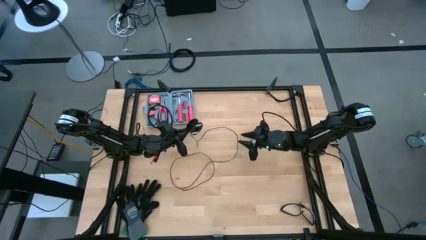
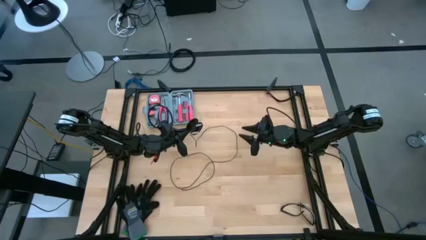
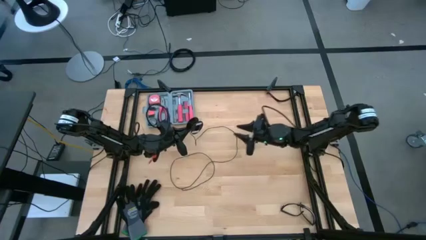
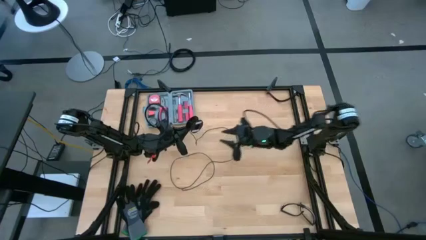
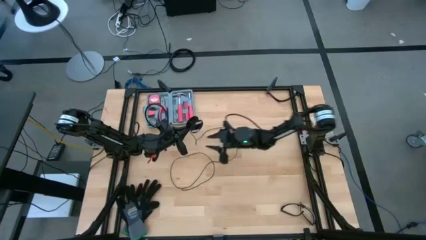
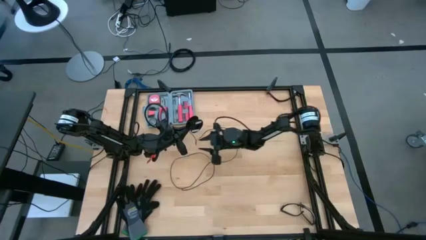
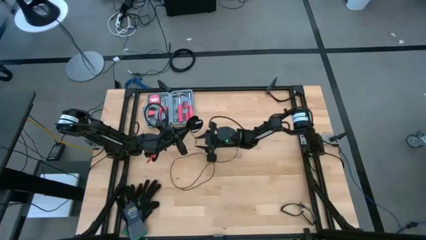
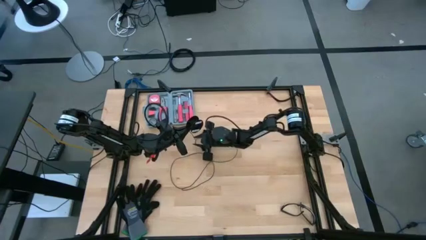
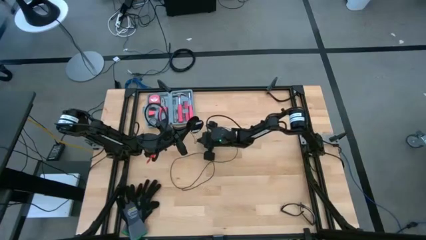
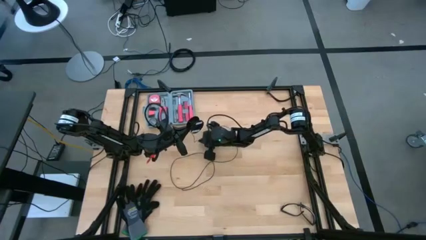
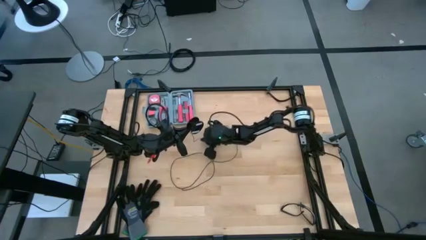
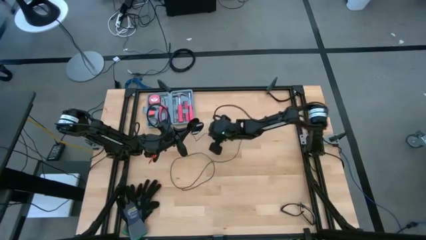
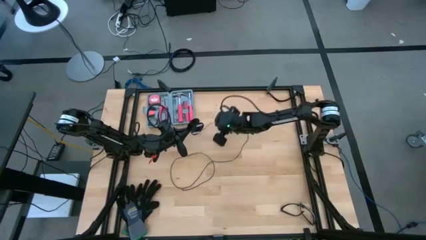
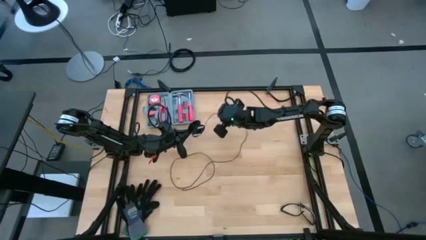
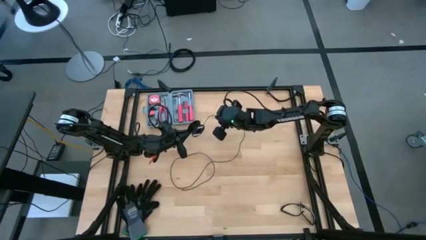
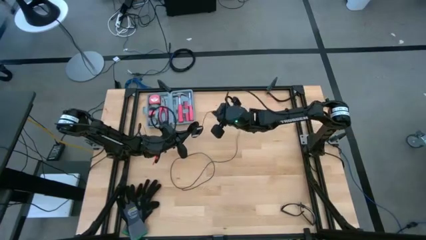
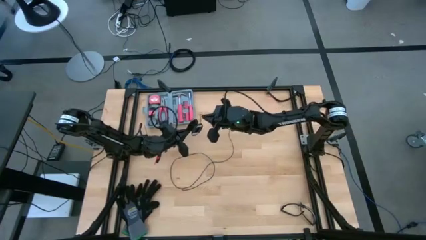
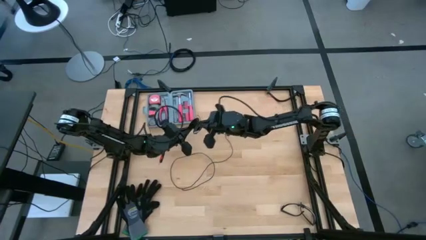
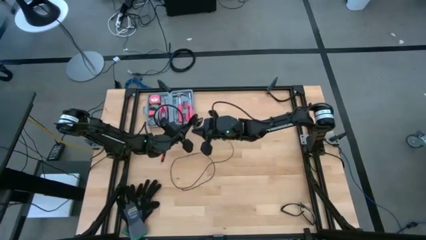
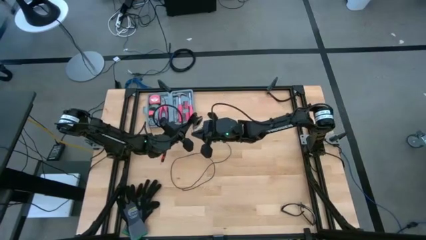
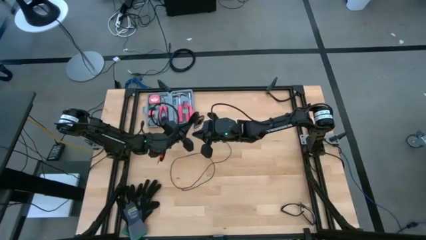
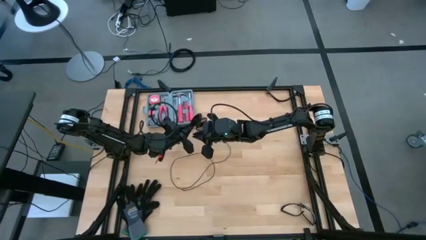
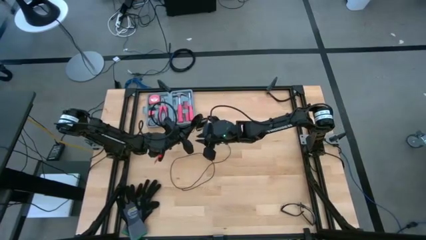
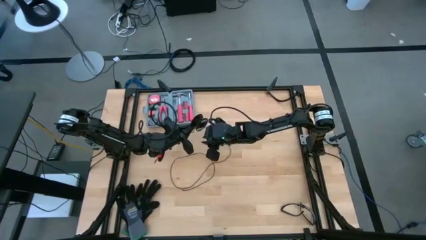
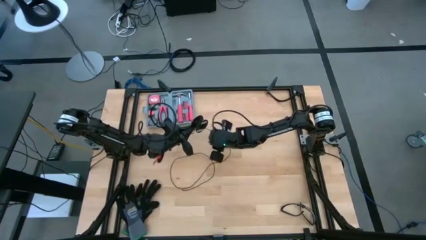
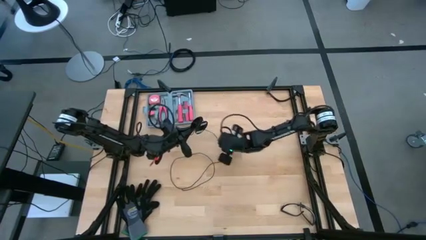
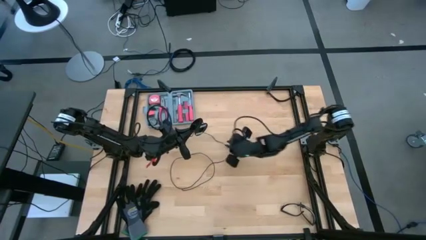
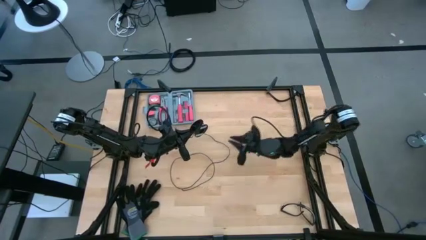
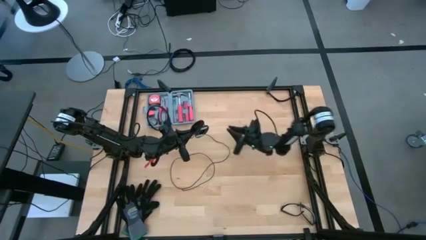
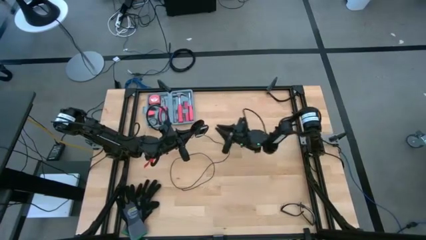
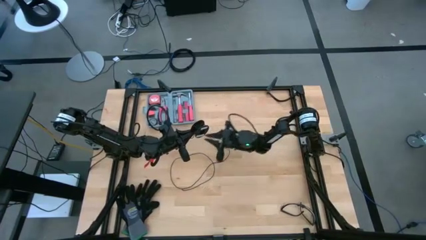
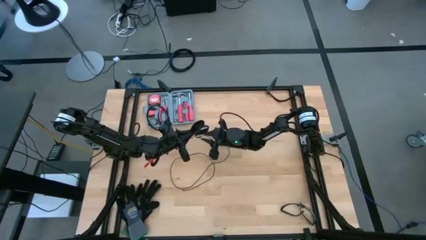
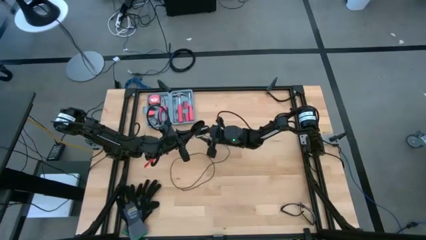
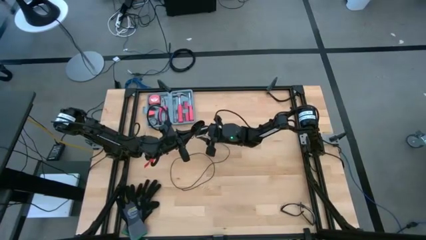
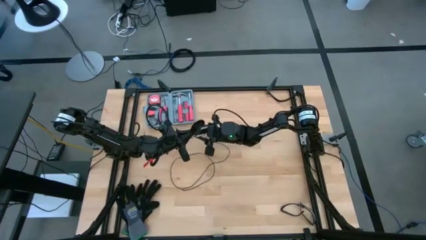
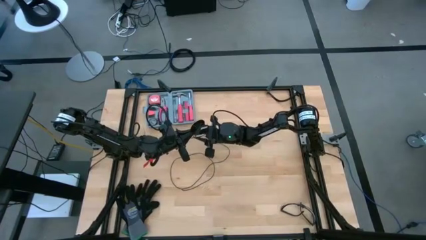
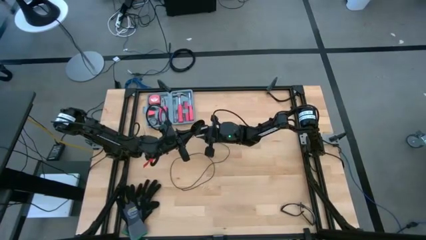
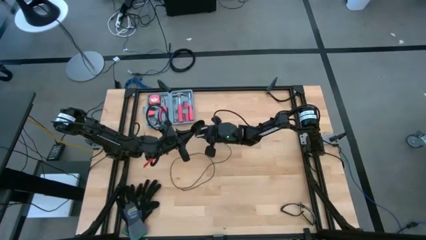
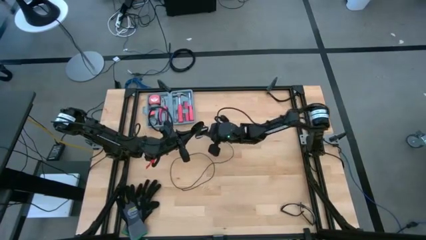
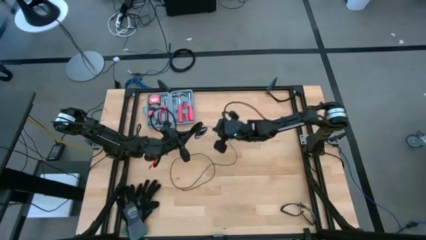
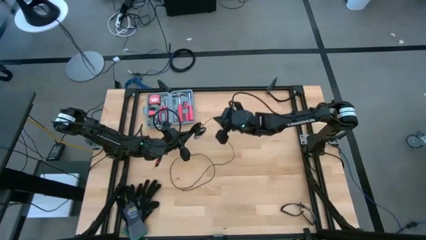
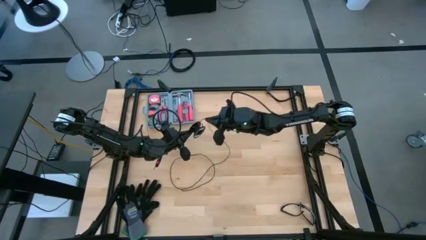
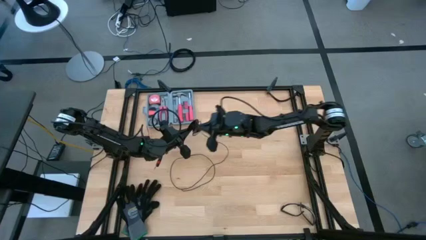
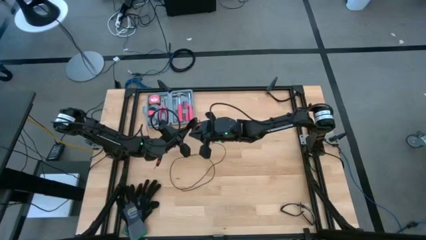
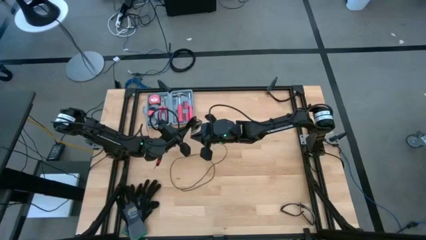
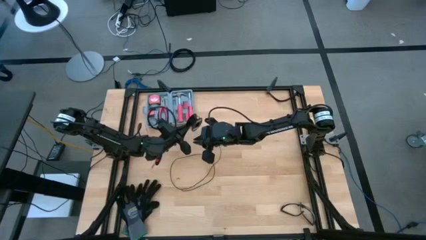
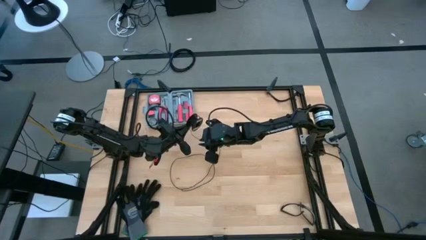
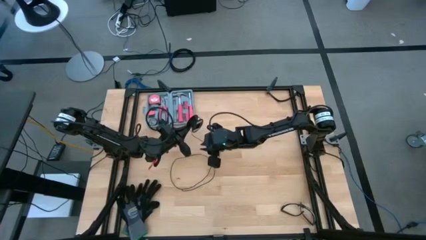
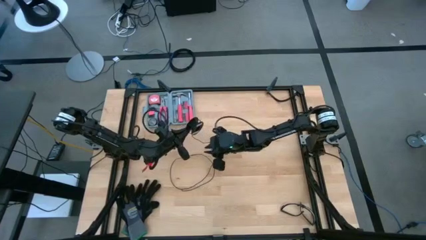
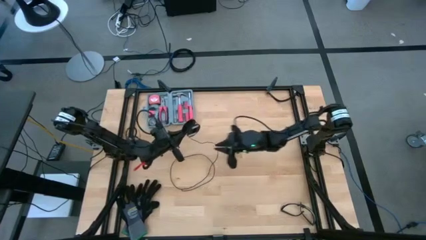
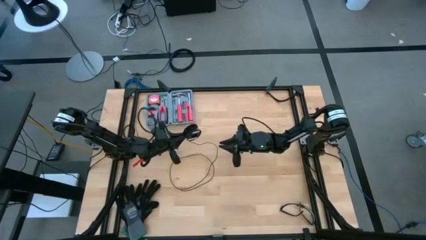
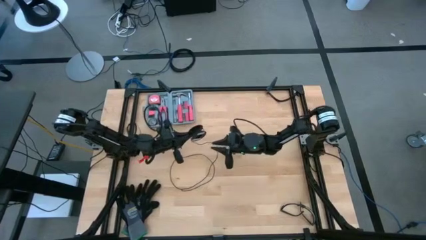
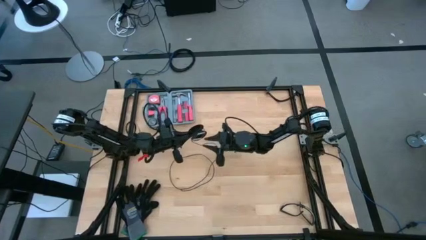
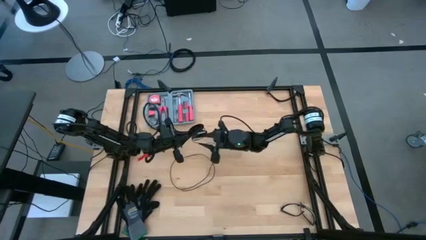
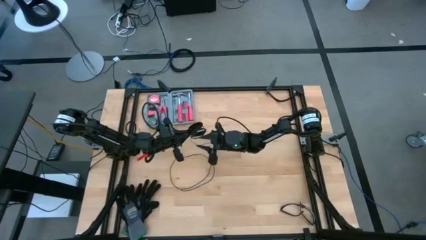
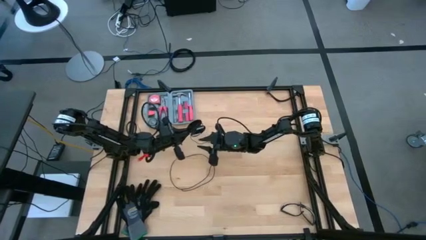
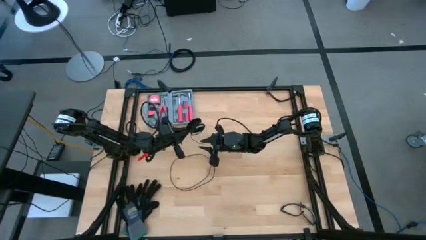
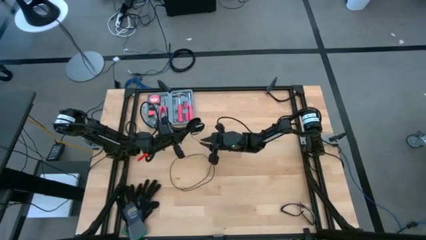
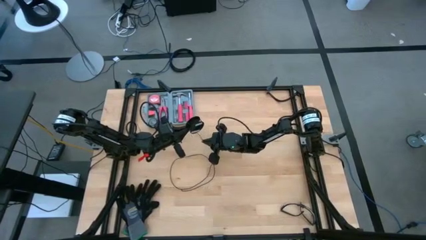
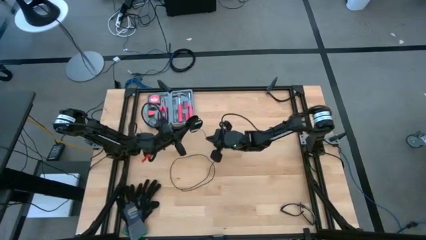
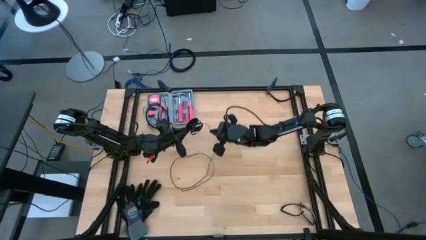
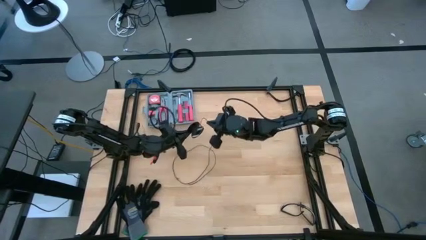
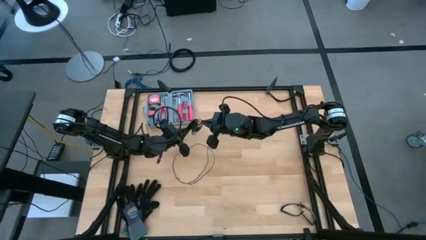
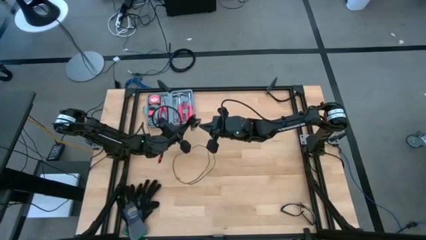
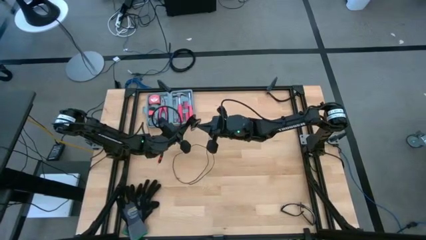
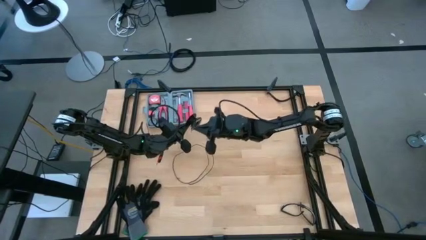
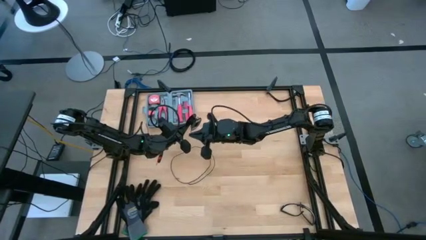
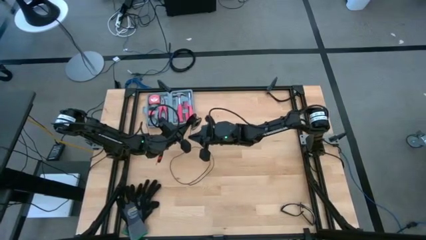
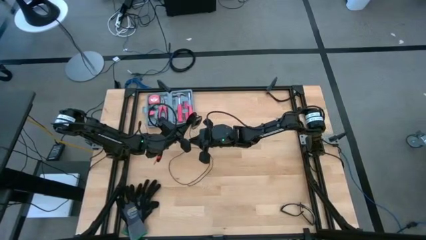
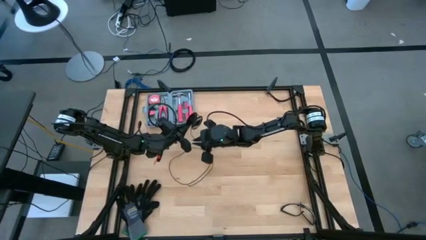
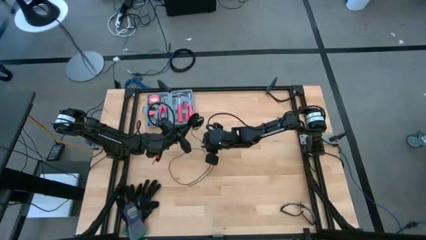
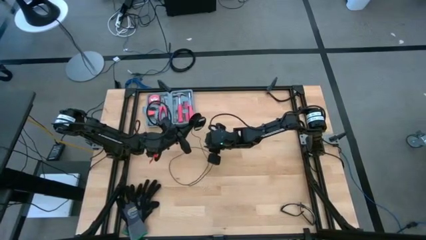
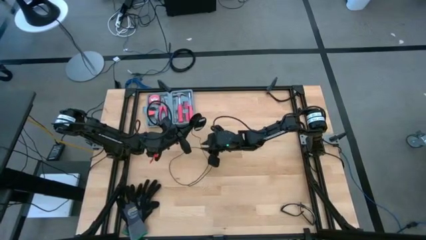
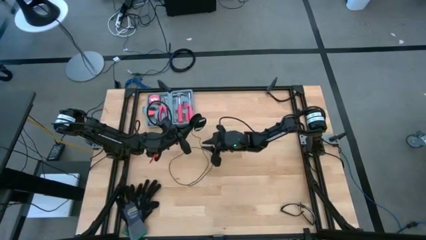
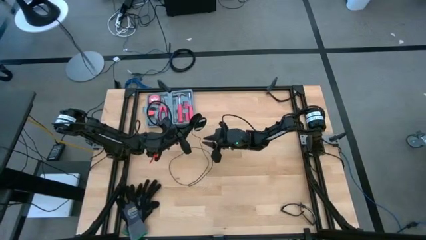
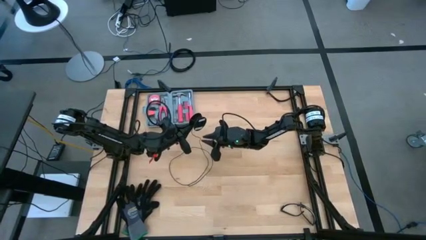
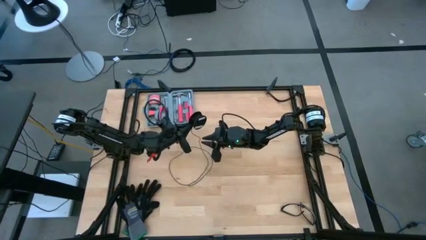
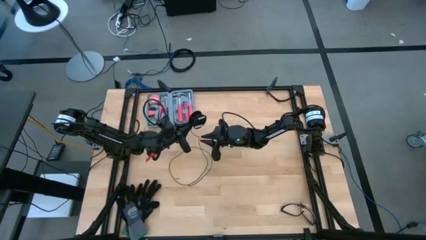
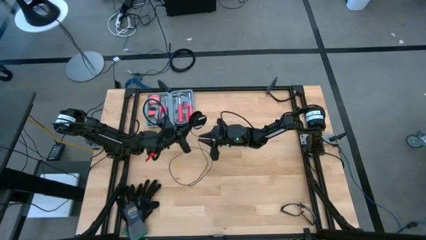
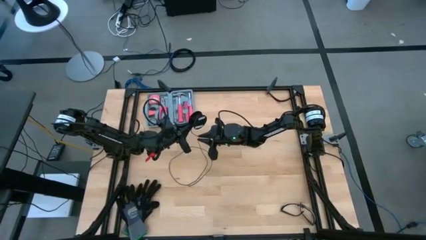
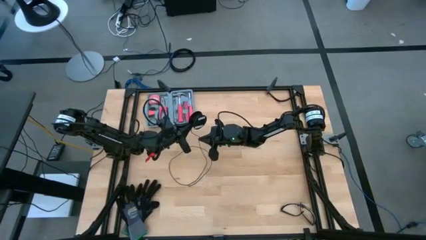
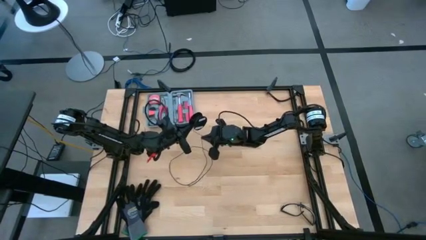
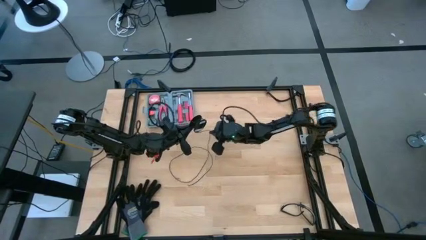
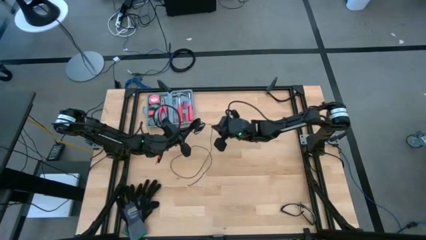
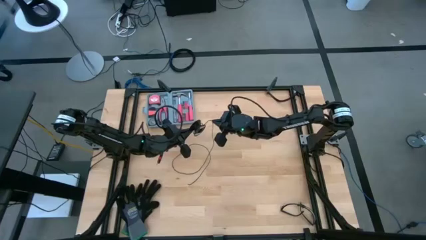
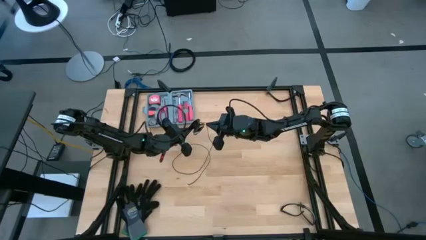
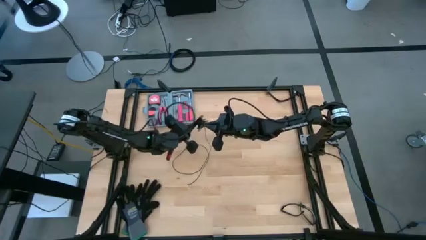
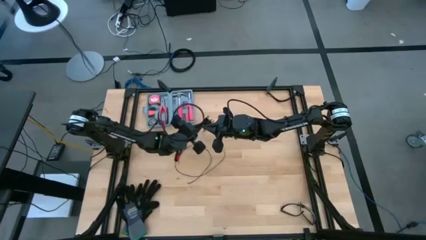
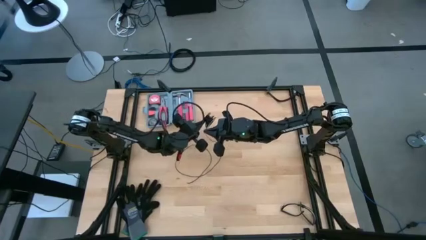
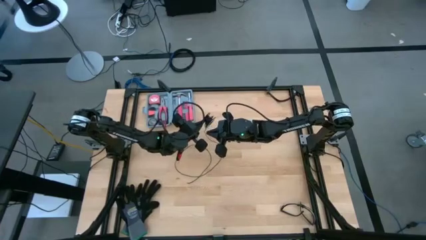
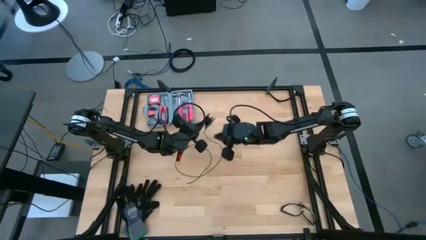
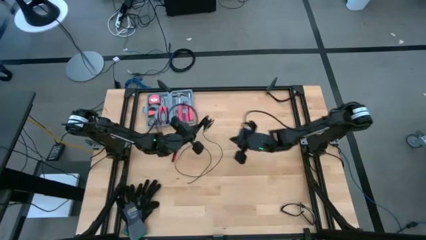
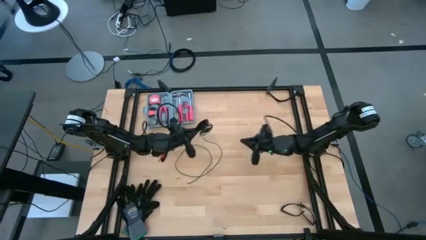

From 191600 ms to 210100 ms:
Task: Coil cords
Coil the black wire onto the spool
